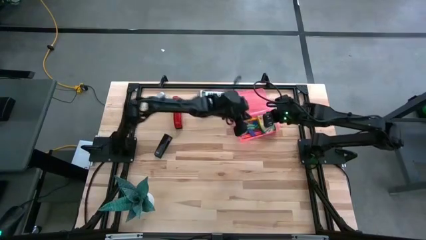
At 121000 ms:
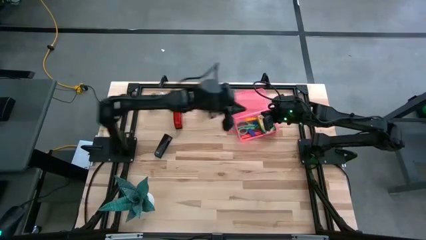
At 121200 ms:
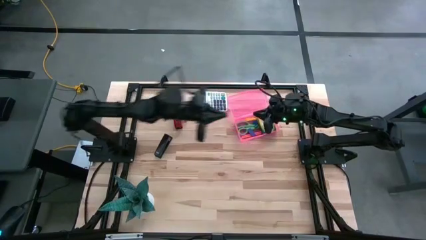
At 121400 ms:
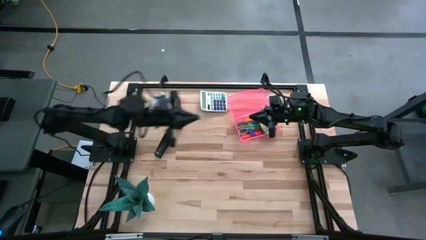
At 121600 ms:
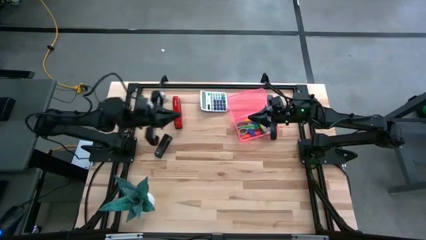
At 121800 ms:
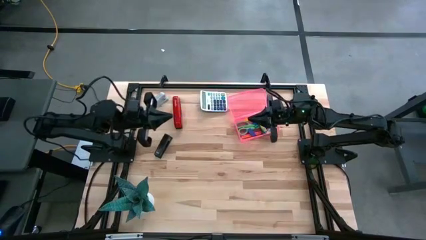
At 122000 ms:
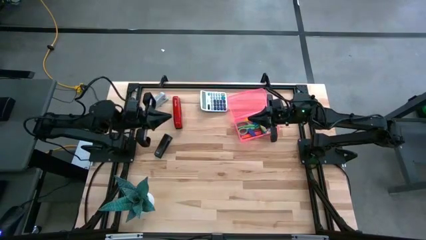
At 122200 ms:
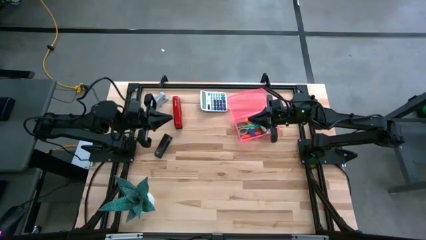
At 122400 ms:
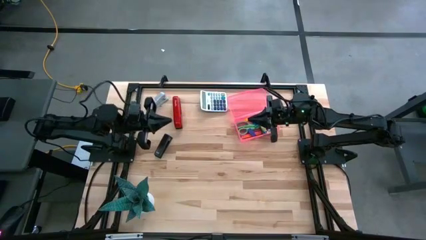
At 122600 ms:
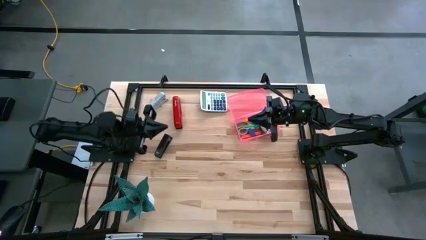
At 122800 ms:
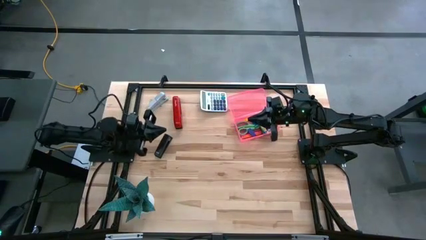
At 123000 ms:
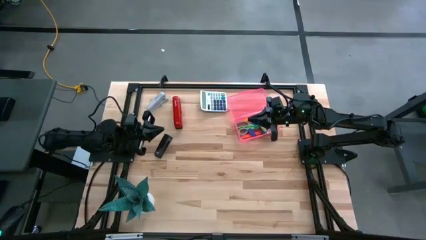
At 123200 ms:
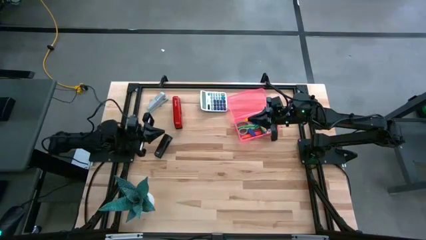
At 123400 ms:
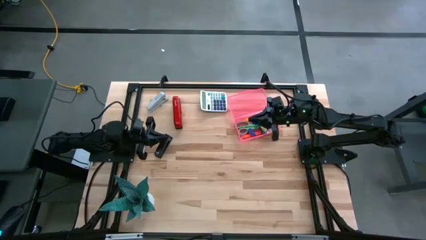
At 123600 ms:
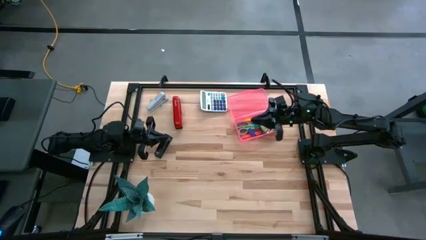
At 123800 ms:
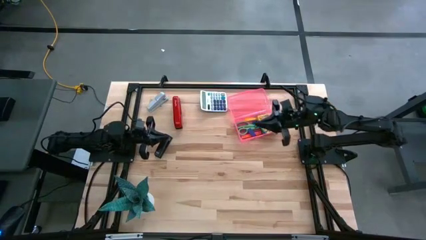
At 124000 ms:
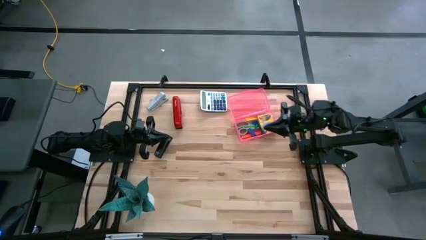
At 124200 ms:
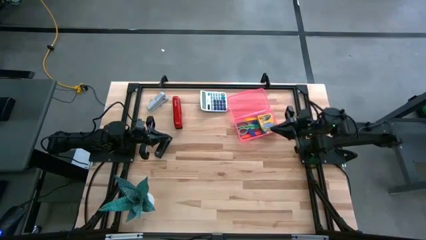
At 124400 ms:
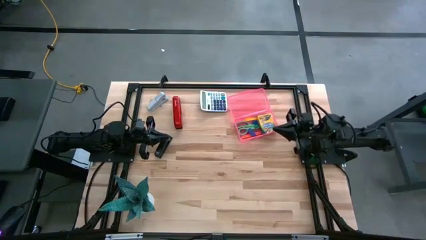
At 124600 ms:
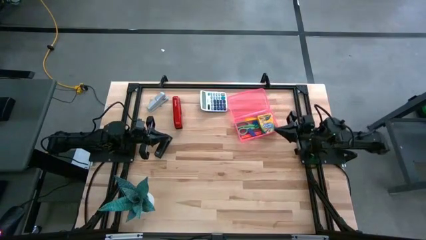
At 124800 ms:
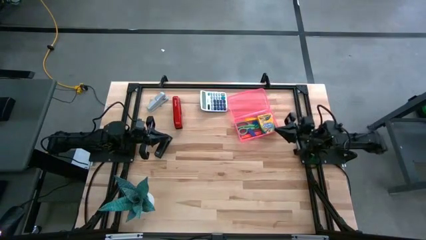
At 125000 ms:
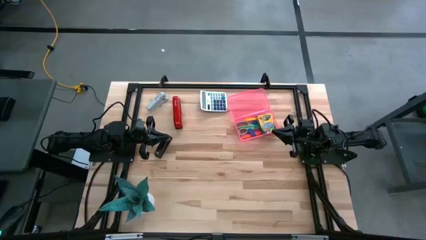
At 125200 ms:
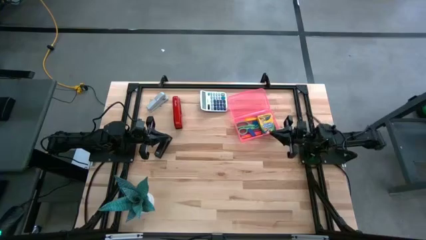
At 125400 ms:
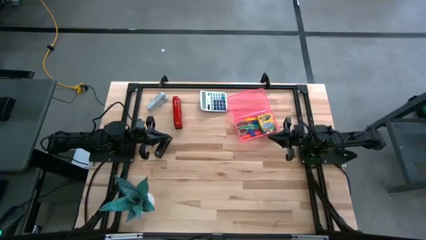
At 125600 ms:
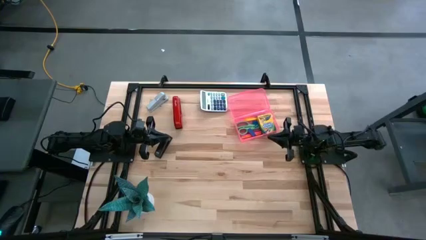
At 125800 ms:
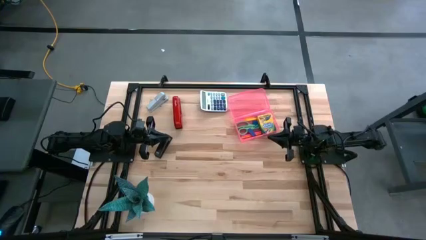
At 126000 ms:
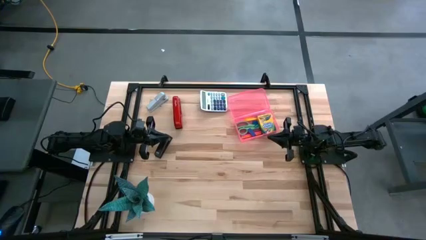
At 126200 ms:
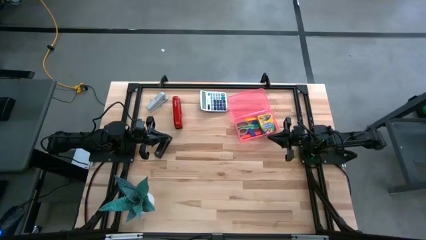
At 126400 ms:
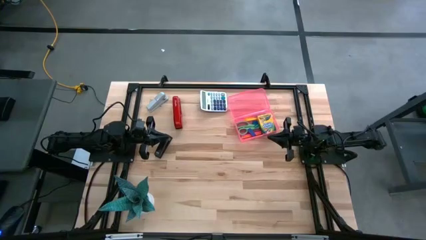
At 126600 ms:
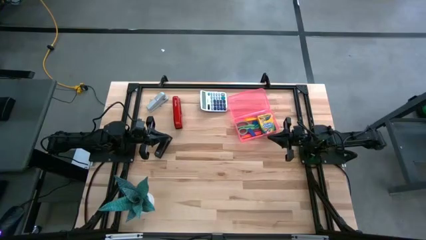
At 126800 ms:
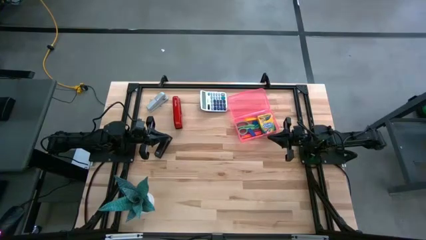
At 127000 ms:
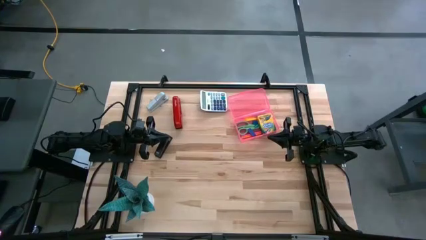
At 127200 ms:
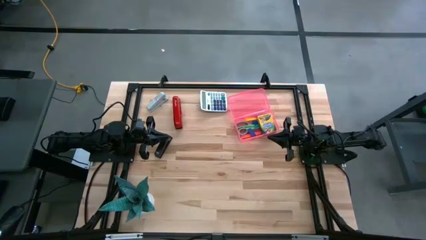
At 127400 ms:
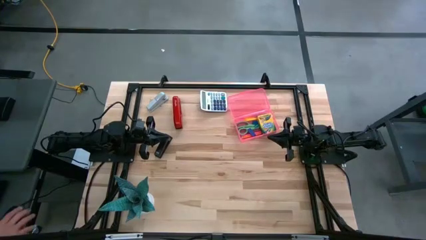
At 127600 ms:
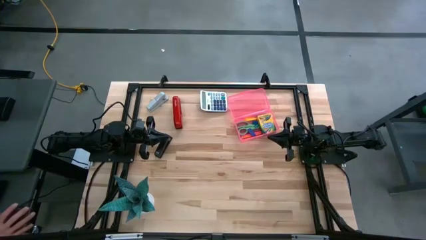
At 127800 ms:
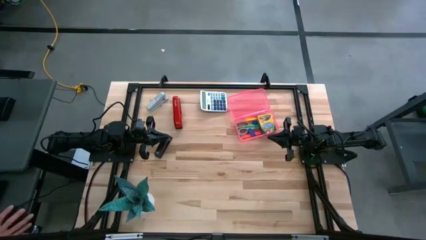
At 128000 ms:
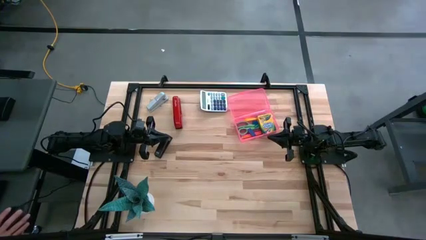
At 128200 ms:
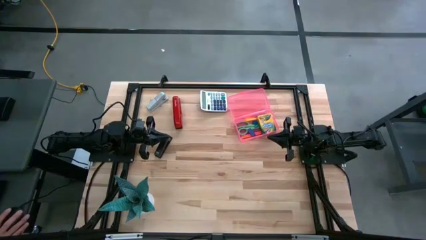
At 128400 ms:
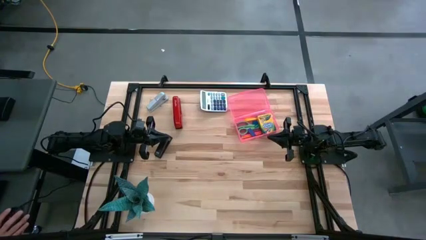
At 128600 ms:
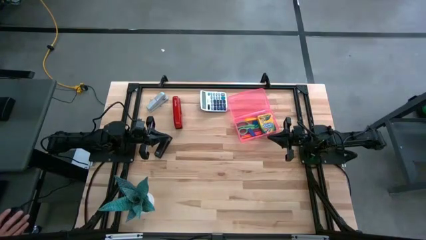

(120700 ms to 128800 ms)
Task: Pack school essentials
Return to Home Position

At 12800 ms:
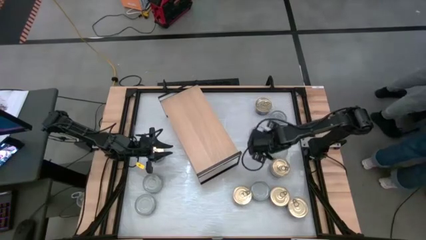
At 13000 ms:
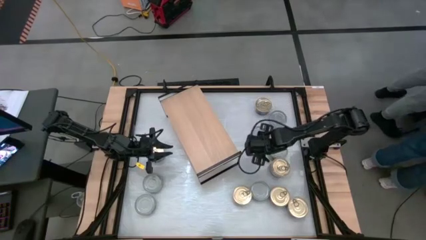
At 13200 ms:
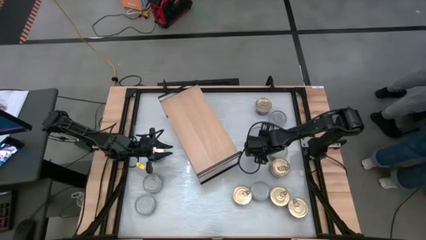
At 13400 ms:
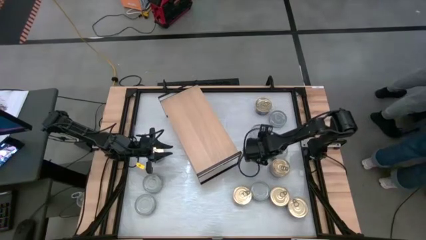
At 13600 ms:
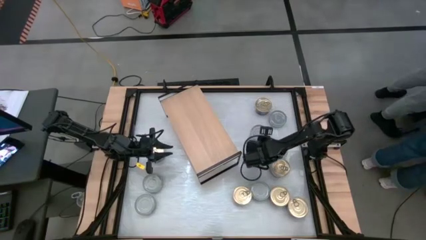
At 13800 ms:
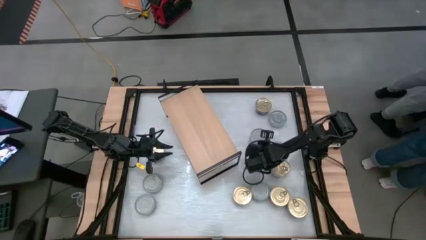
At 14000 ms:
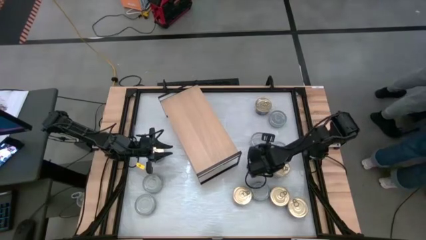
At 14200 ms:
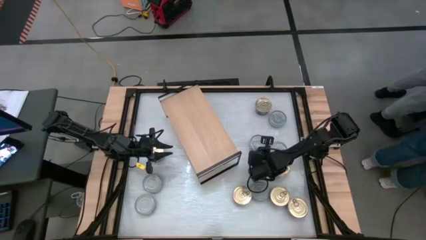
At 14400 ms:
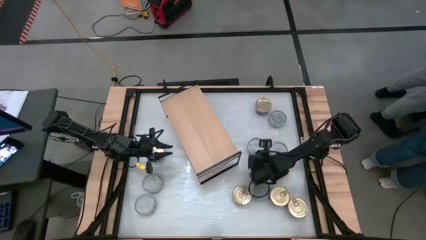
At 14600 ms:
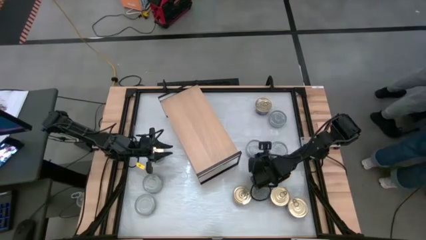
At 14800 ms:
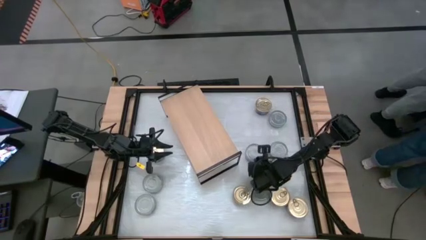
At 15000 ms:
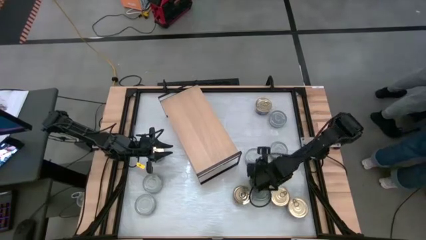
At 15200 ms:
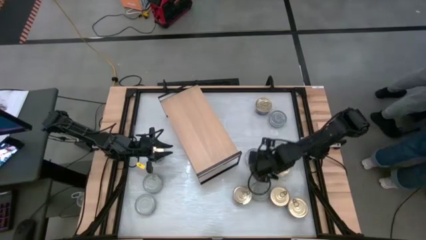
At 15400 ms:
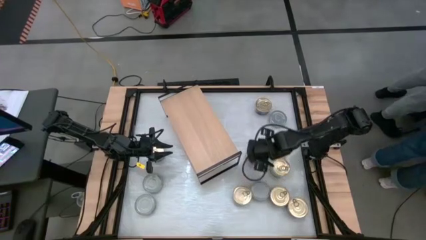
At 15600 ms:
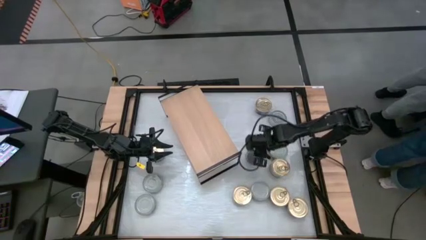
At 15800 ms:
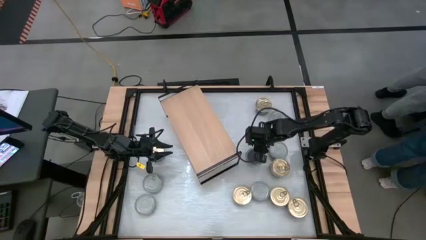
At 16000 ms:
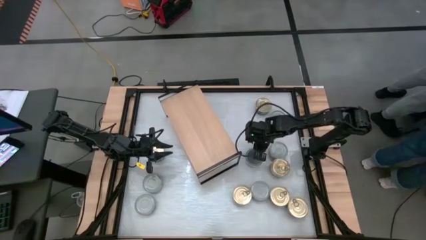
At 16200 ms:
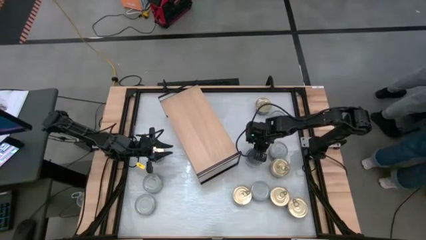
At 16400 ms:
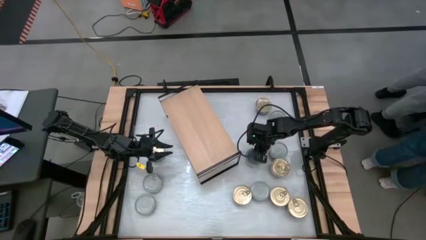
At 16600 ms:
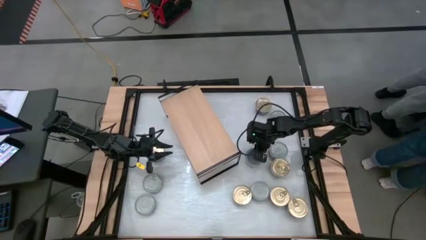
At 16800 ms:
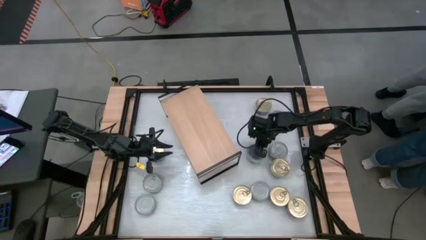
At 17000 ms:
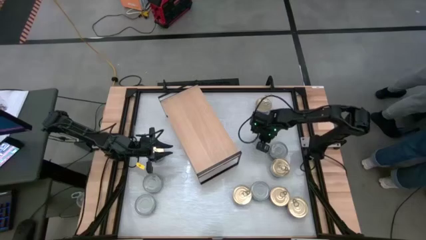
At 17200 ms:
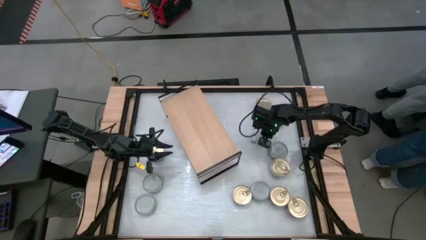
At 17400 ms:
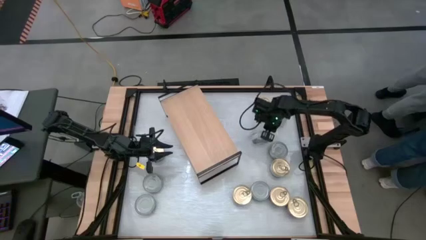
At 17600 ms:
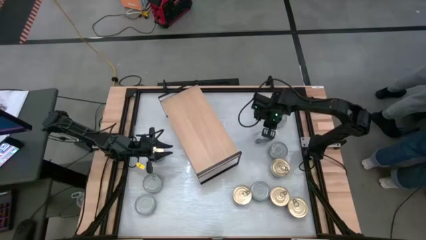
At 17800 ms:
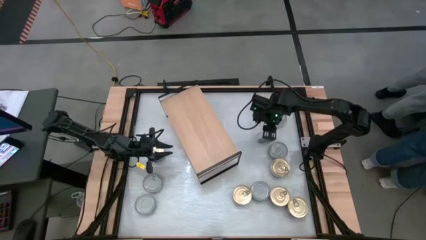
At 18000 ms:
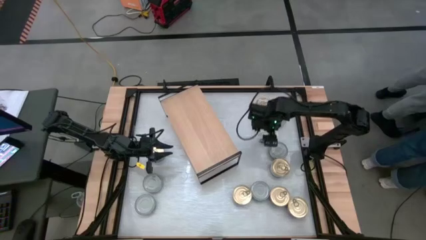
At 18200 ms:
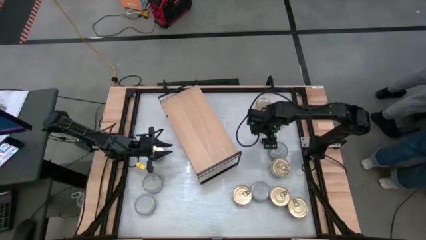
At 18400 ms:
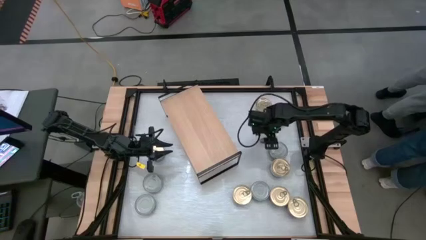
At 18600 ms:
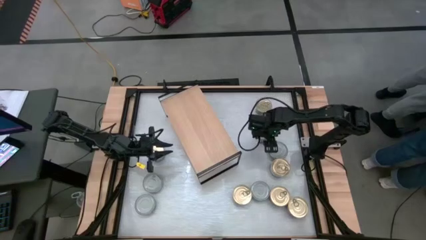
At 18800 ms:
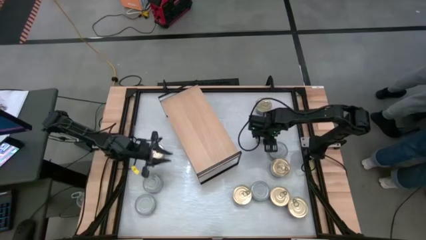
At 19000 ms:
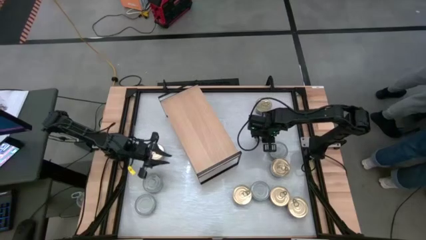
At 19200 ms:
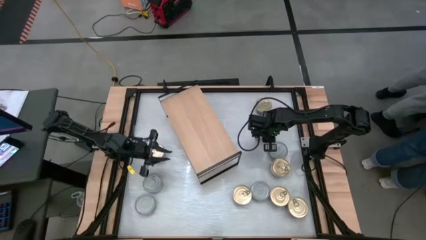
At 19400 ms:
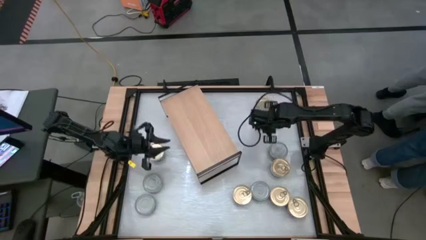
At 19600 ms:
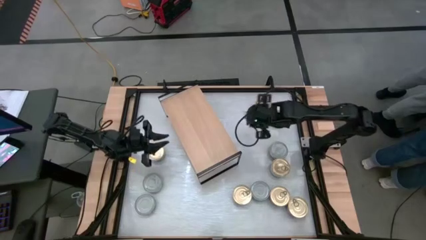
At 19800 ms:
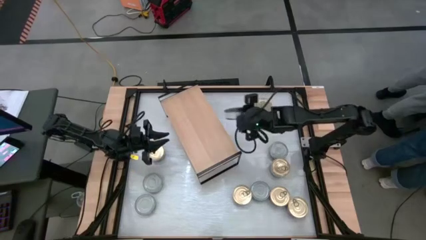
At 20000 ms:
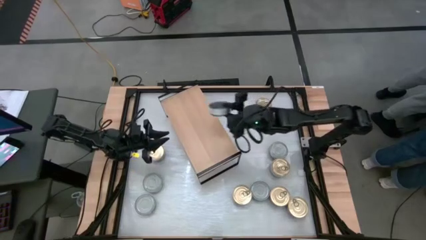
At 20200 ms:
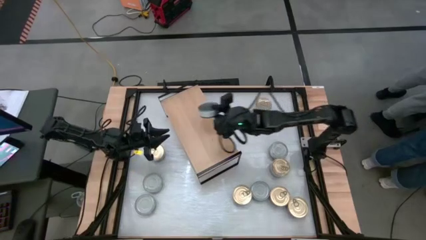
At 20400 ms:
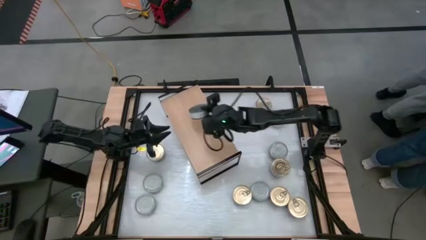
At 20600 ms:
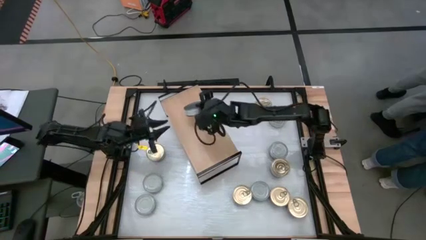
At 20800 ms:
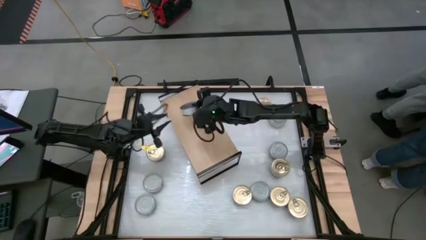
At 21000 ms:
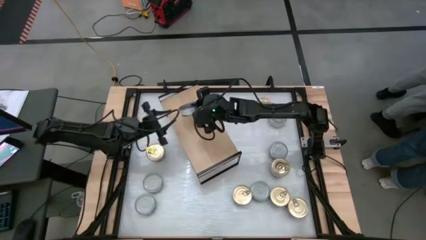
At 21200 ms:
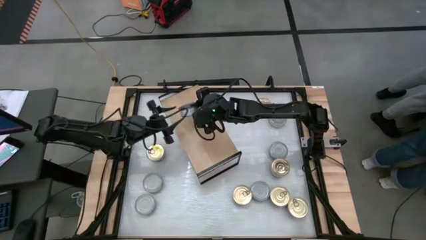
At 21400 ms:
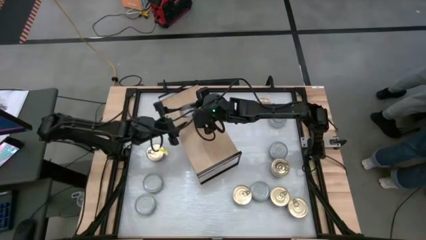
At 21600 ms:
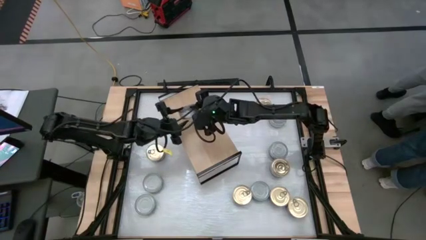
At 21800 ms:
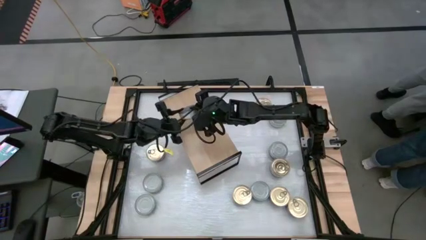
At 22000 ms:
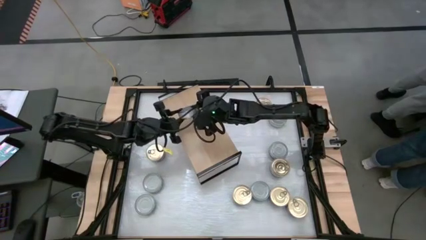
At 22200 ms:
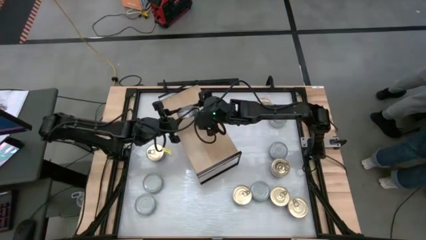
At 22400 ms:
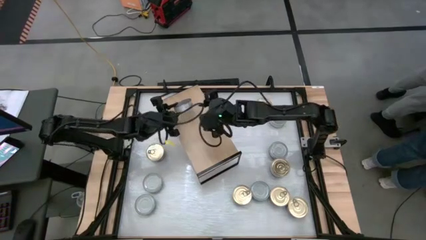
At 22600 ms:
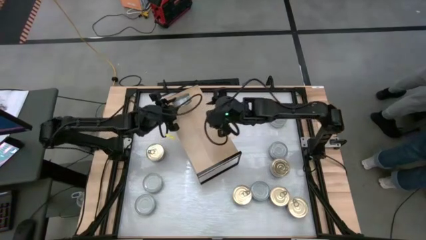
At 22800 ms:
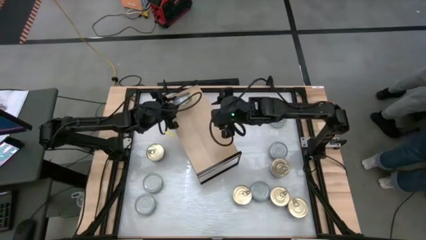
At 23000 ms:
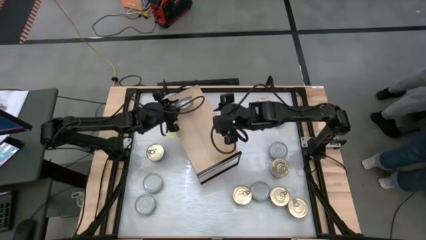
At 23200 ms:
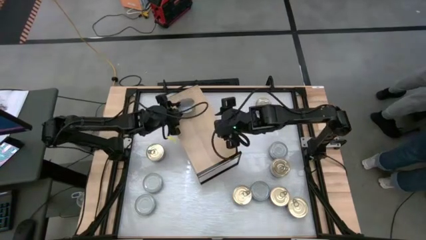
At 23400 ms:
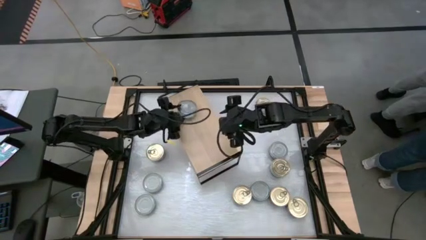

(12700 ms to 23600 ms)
Task: Stack canned seafood by type on shelf
Put the green tuna can on the shelf
